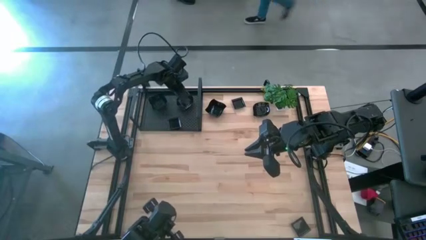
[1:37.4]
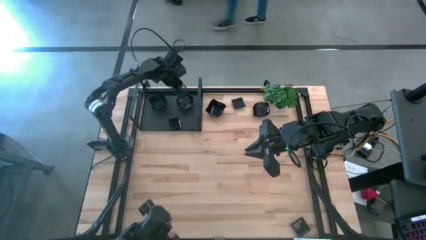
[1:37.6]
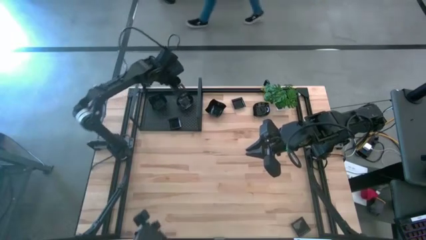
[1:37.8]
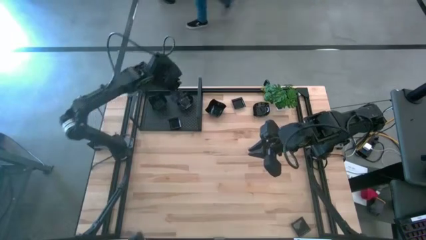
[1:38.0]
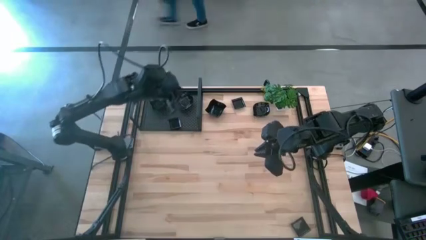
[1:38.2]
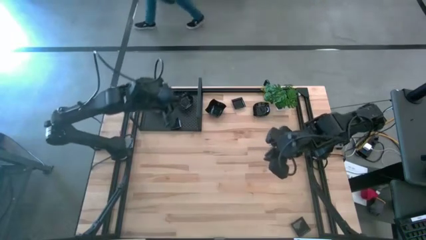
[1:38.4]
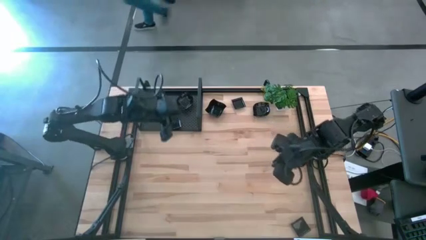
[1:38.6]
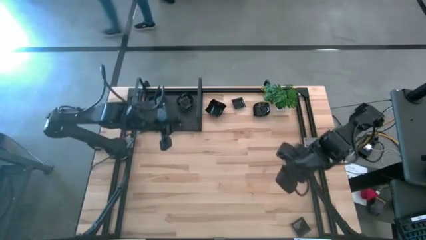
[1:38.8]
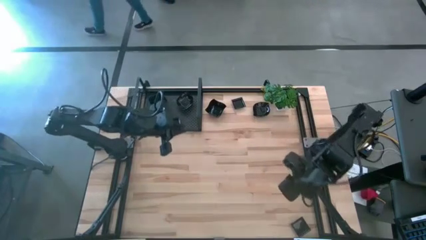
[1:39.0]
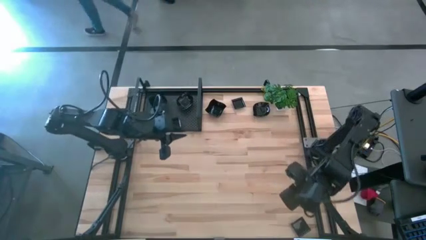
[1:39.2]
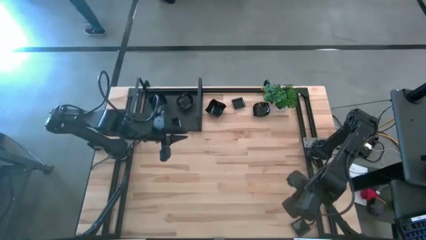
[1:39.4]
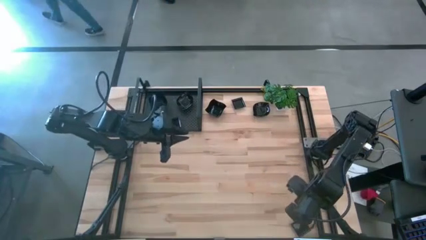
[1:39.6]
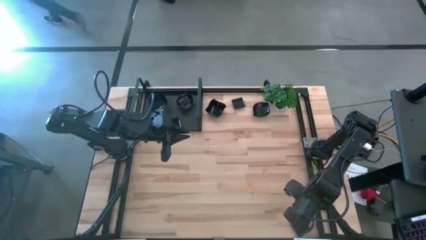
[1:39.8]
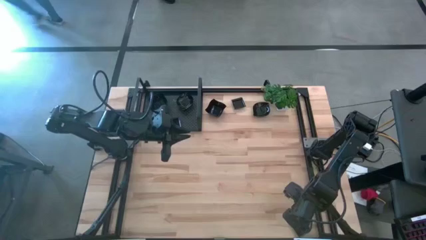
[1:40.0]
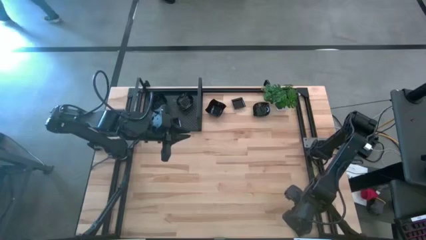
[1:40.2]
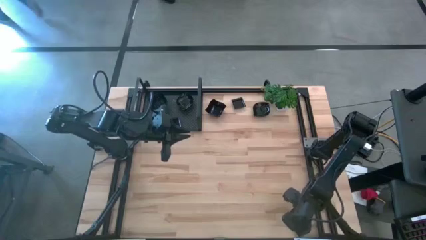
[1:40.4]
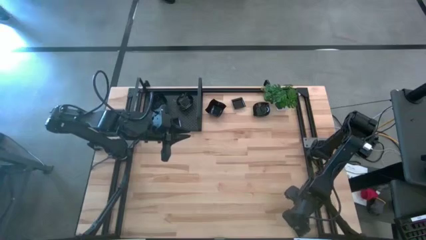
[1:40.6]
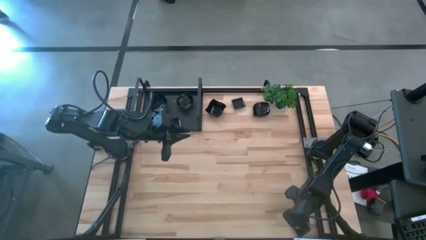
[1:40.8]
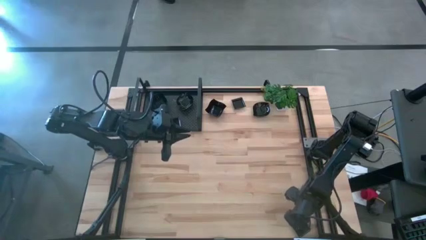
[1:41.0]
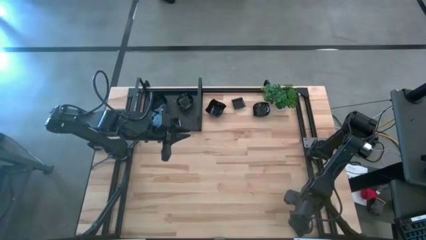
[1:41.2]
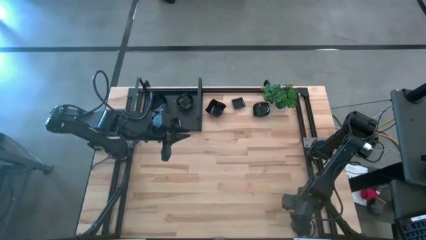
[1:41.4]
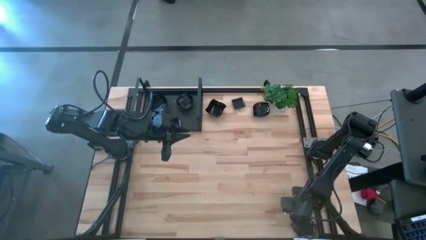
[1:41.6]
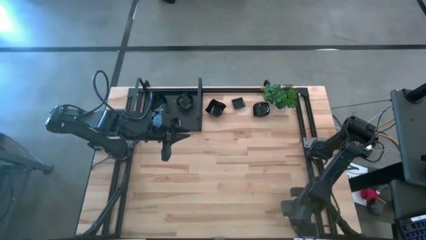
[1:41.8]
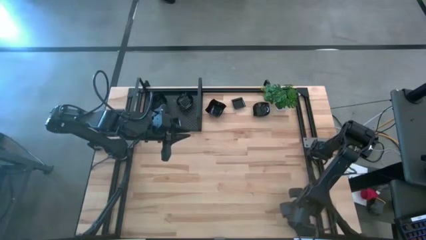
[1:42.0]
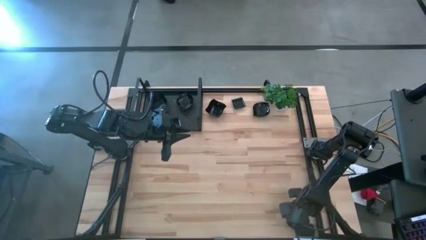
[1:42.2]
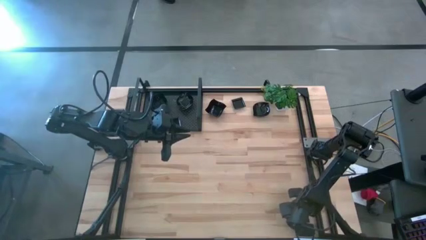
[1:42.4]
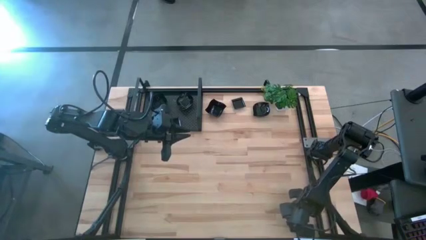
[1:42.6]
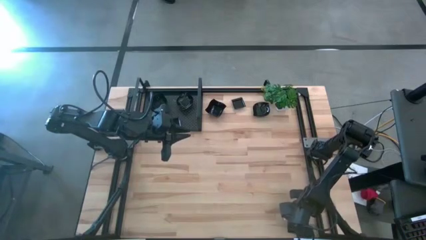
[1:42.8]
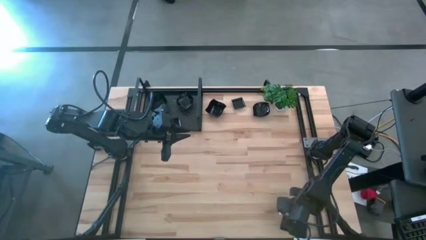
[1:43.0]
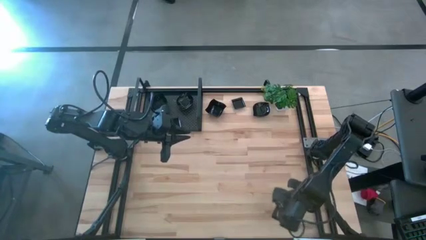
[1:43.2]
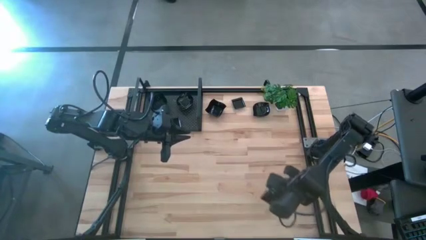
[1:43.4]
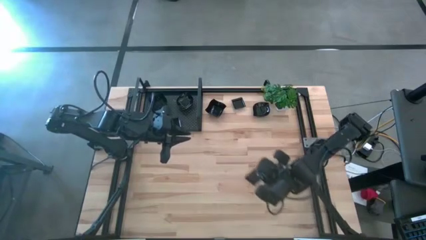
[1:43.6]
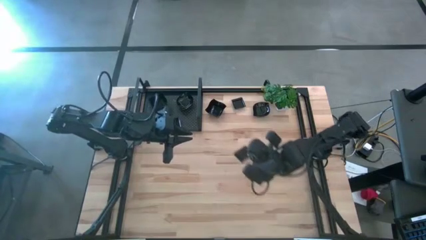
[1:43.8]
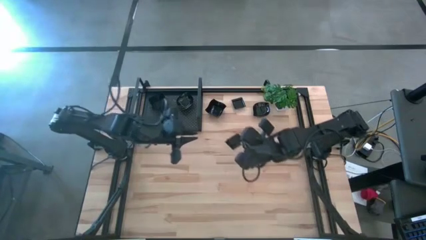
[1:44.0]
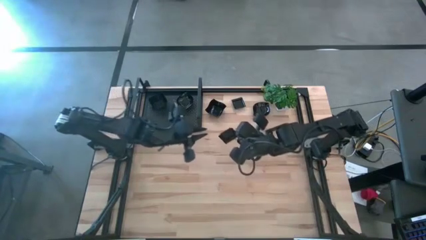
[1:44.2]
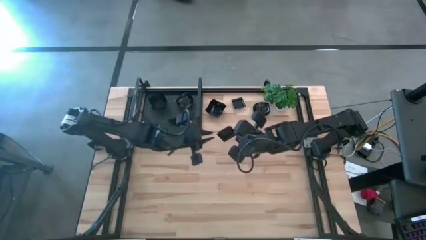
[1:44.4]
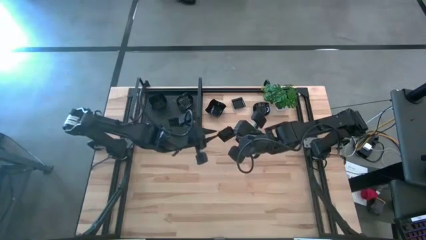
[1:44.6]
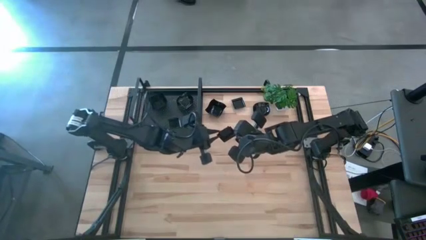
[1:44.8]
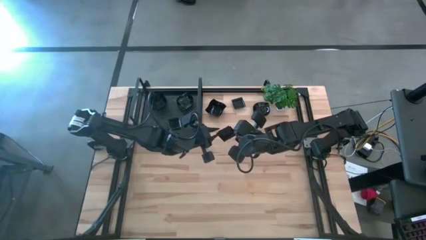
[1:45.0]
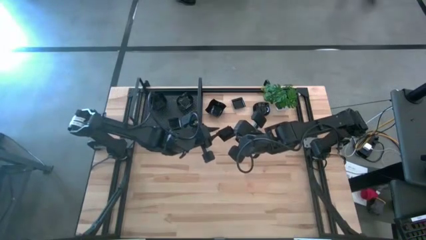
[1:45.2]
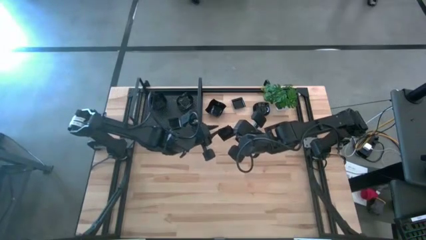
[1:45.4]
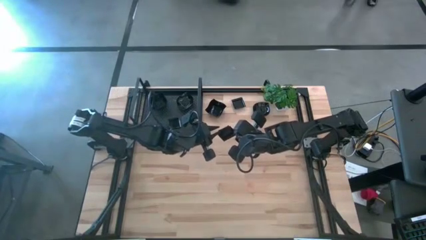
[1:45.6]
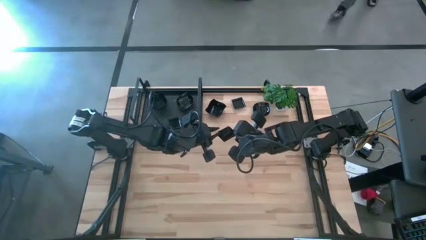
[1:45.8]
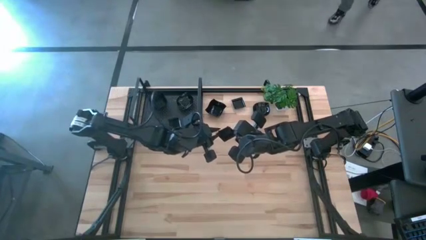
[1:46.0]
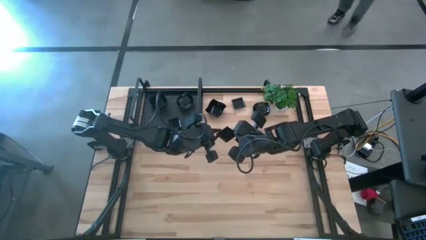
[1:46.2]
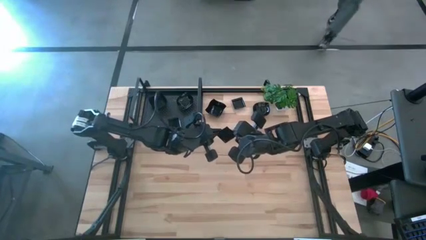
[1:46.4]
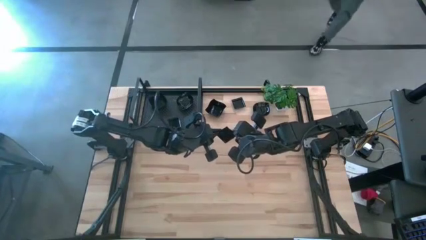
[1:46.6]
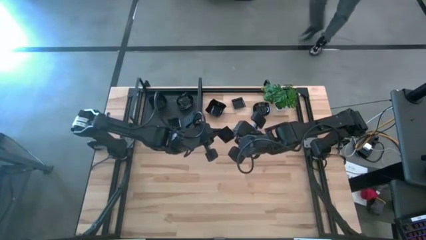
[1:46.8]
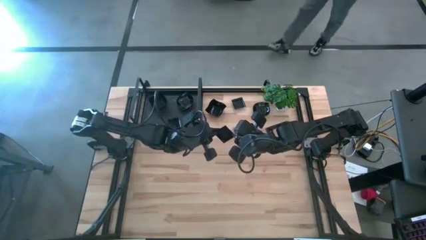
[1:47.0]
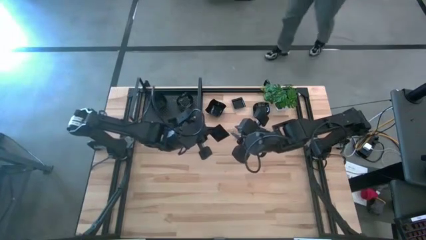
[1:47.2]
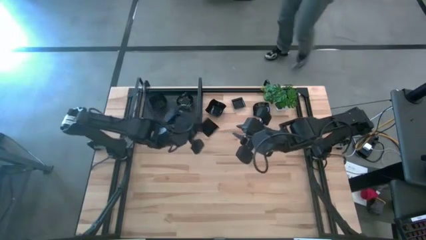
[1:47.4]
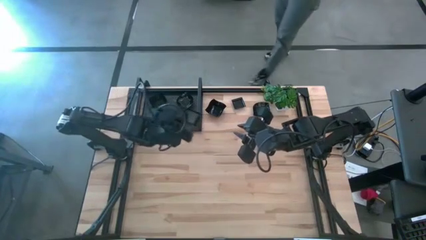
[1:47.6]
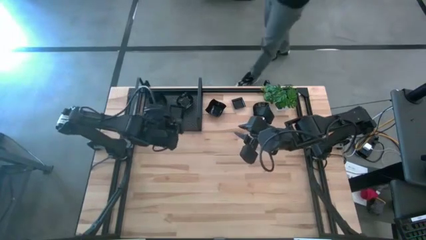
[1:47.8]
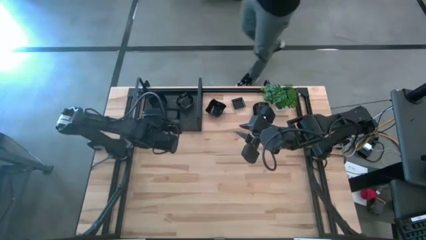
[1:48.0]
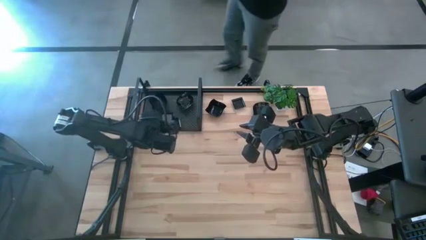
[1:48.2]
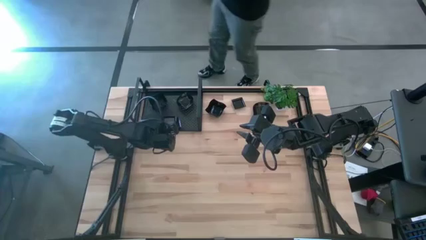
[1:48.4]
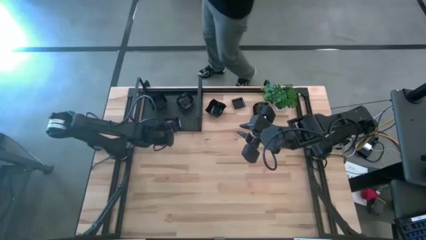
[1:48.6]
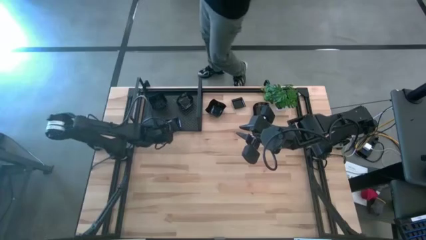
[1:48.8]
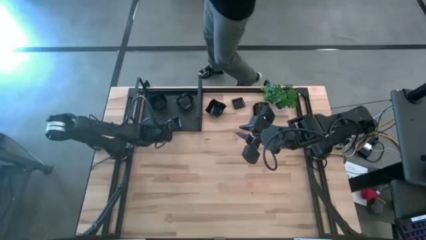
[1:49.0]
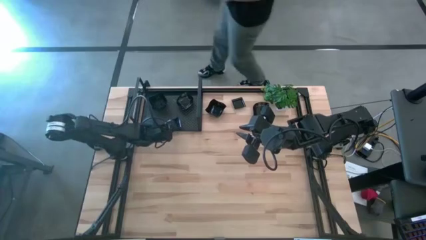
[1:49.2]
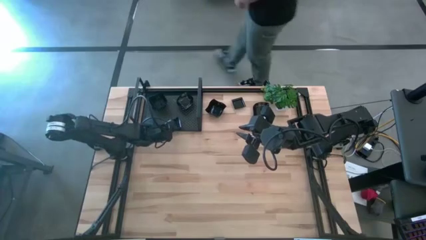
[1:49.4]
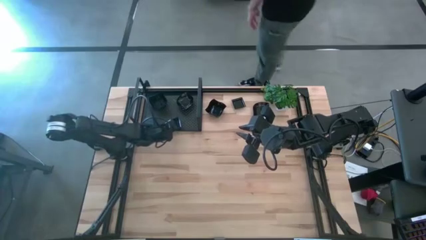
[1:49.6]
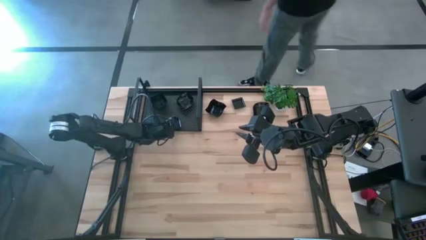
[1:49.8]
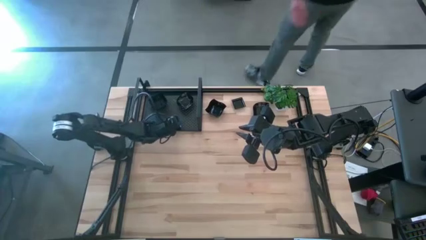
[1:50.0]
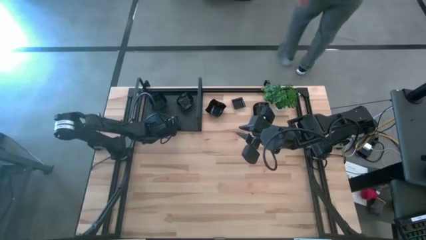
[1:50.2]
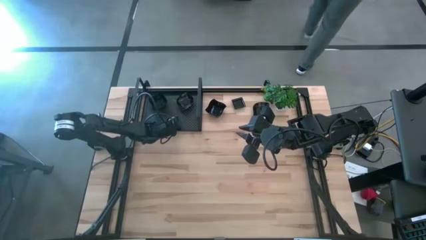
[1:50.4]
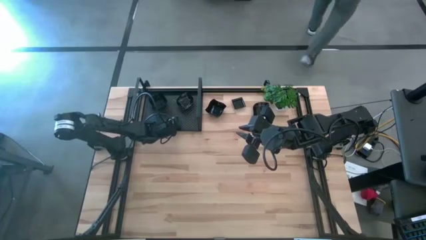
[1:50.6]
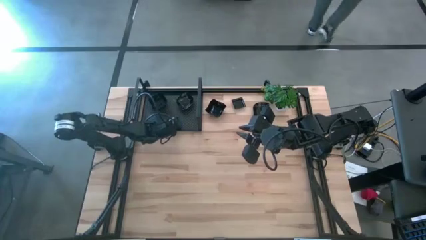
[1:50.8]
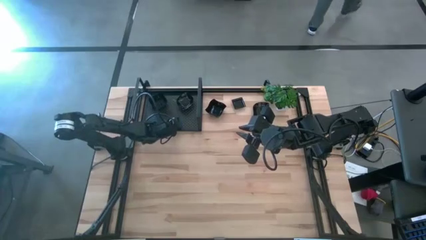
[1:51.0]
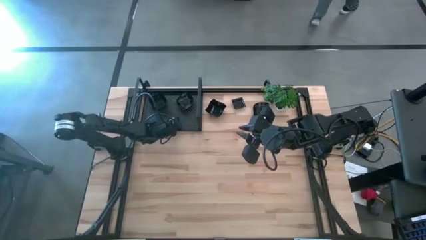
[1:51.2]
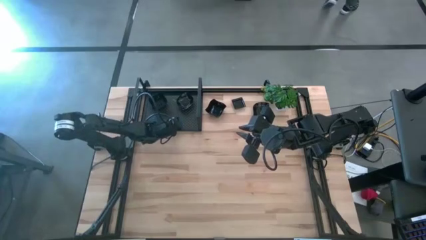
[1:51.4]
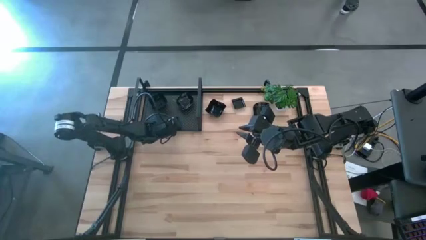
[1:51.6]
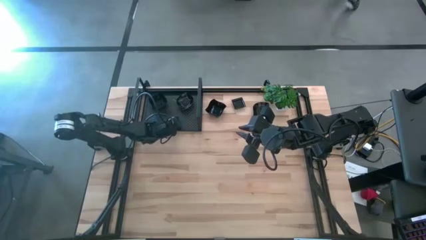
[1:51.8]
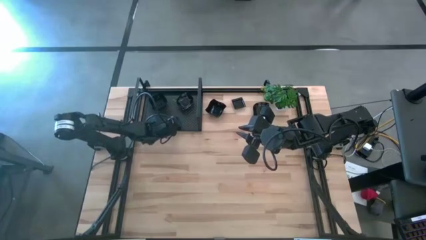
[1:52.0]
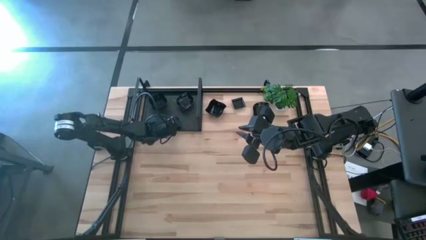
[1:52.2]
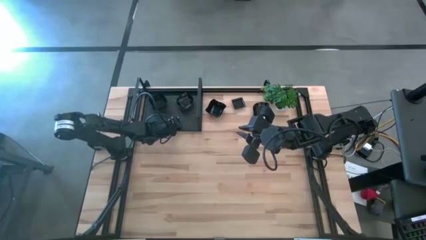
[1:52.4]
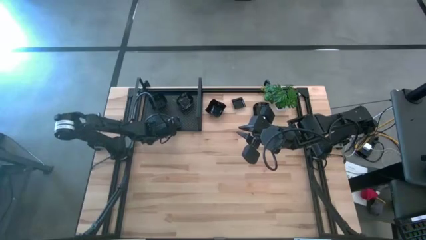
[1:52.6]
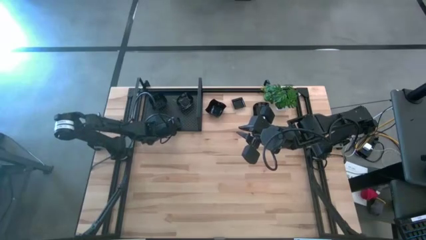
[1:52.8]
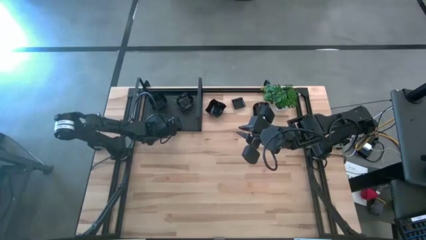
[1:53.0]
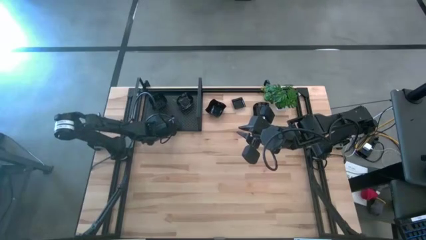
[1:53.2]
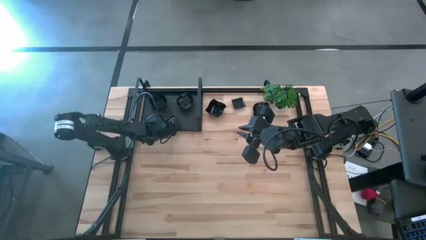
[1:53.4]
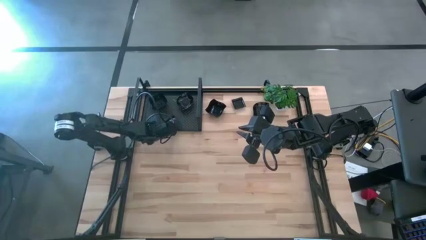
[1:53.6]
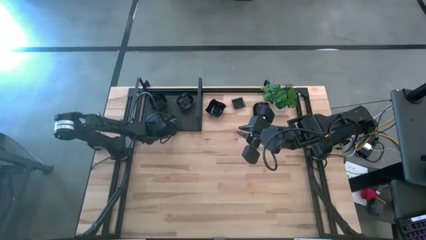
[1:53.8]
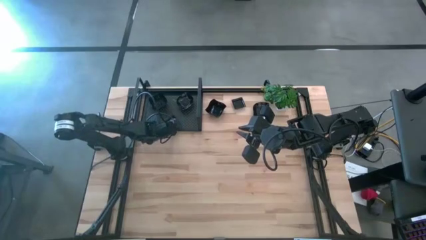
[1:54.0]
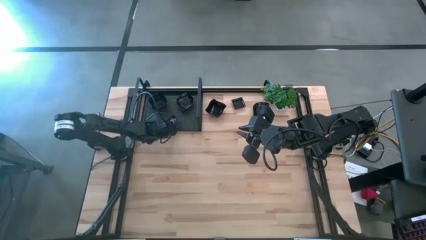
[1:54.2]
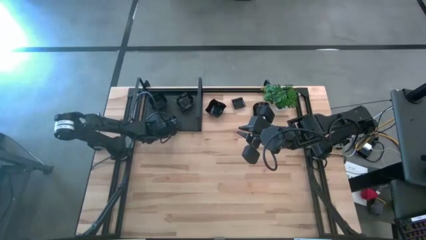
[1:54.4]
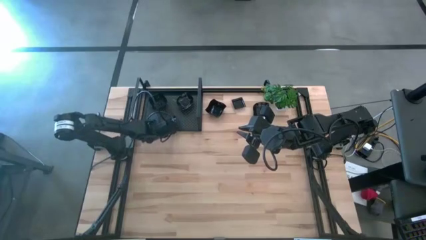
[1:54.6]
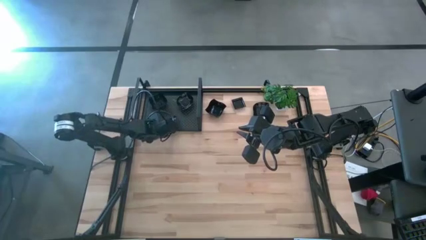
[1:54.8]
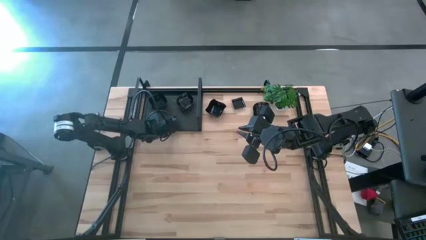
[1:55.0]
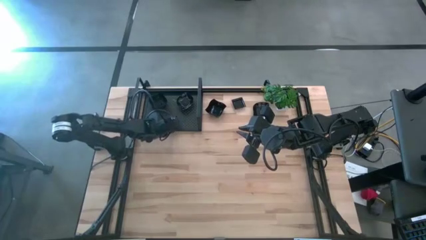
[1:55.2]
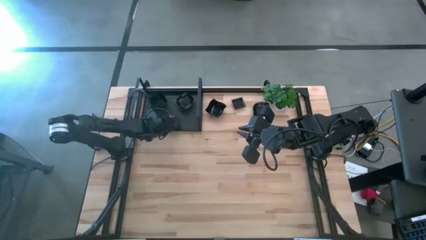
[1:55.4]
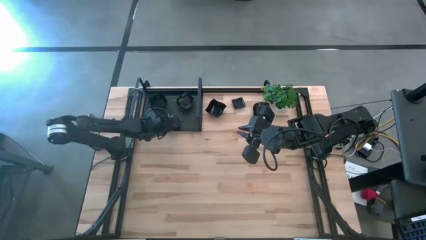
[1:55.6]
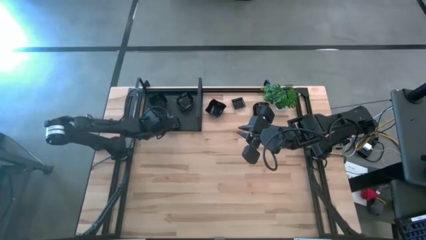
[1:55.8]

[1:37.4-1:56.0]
Task: Pick & Place Mini shaped plates
Stack the black square plate on top of the black square plates on the shelf
